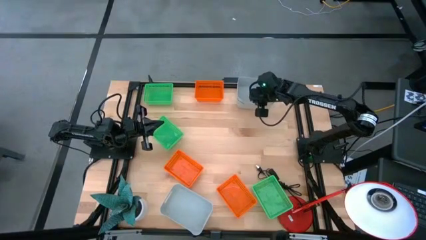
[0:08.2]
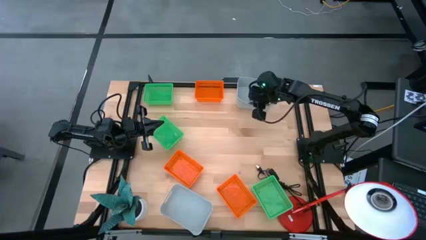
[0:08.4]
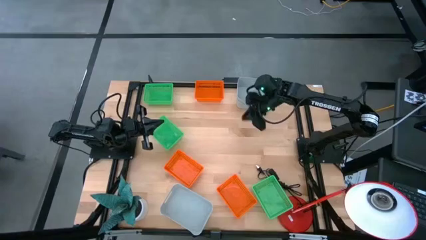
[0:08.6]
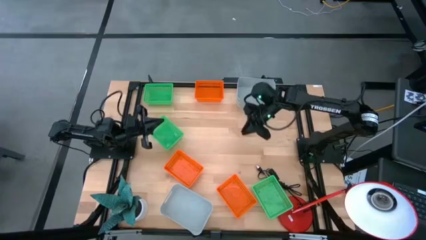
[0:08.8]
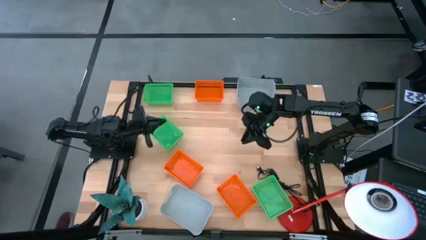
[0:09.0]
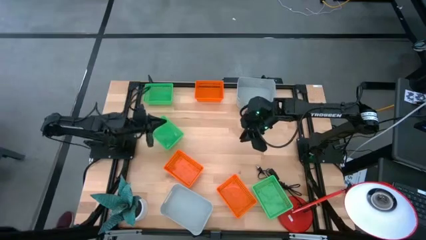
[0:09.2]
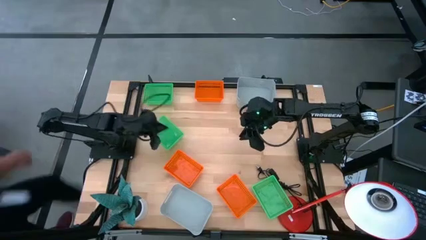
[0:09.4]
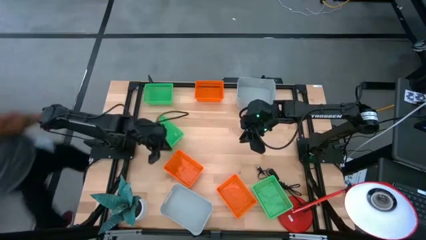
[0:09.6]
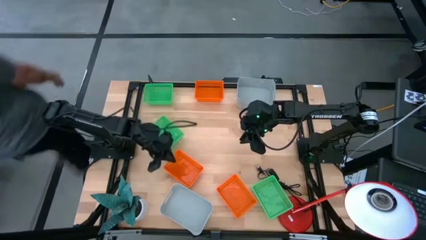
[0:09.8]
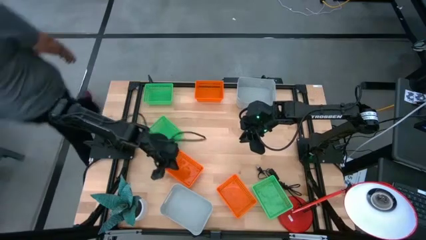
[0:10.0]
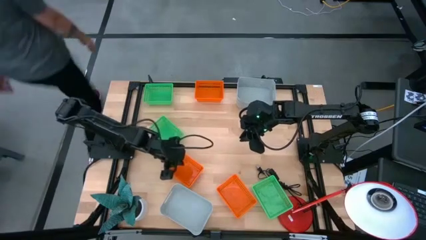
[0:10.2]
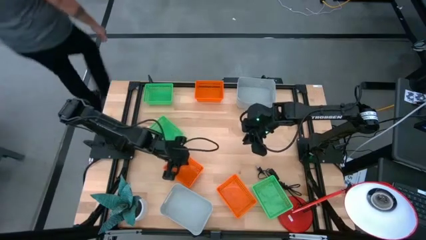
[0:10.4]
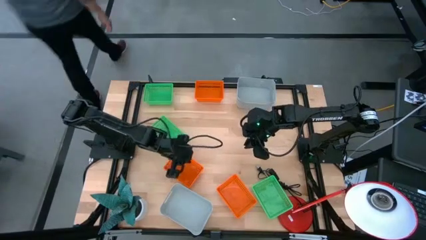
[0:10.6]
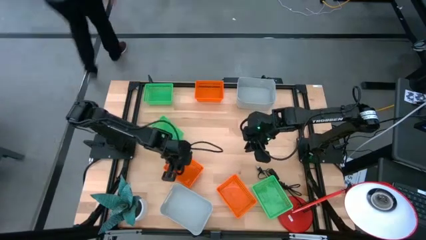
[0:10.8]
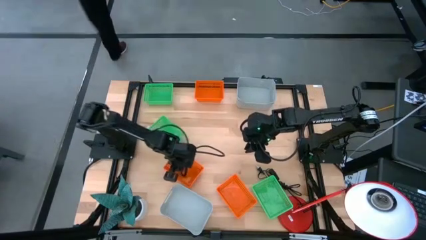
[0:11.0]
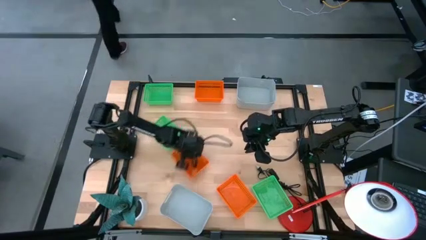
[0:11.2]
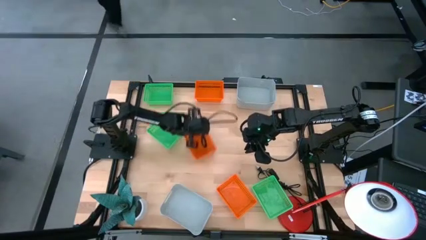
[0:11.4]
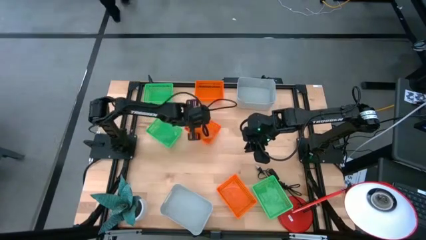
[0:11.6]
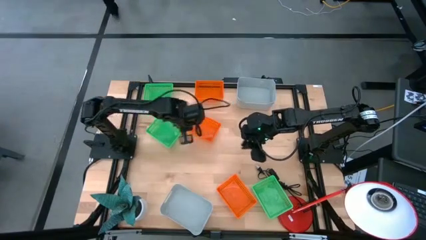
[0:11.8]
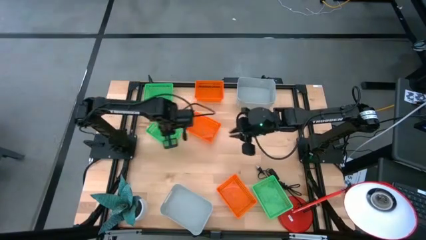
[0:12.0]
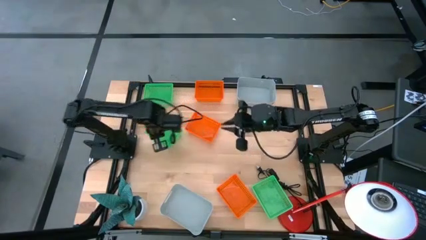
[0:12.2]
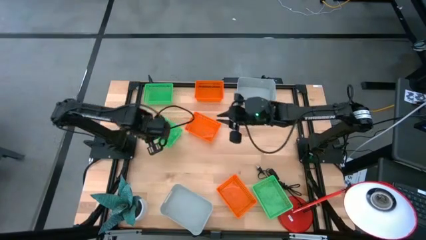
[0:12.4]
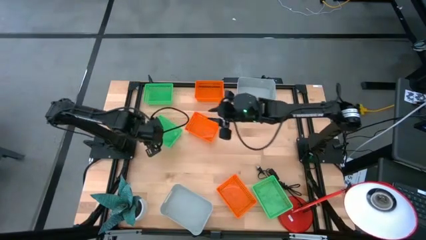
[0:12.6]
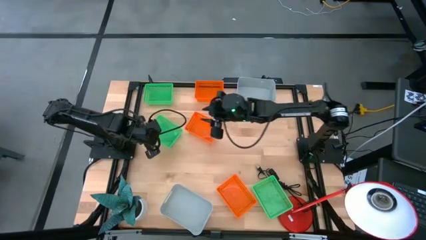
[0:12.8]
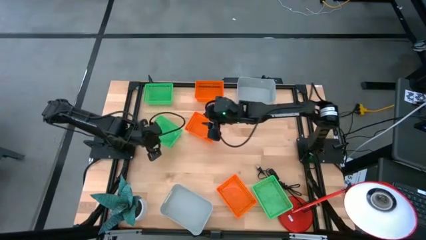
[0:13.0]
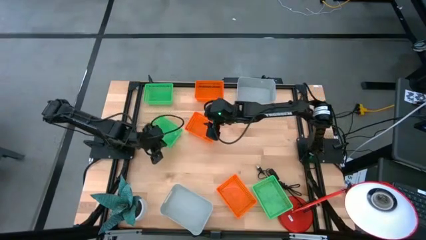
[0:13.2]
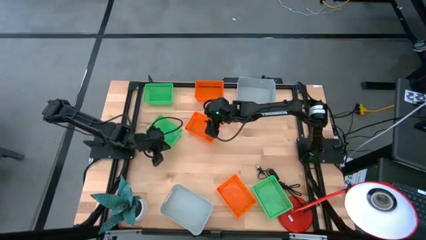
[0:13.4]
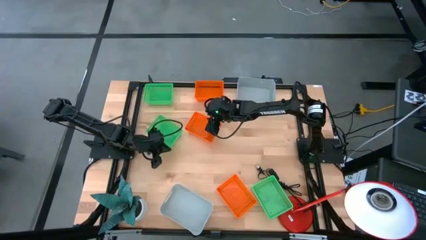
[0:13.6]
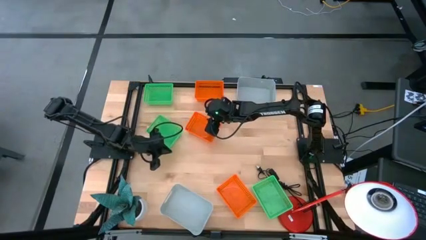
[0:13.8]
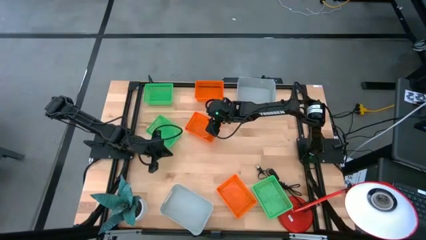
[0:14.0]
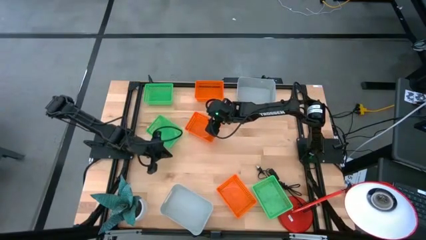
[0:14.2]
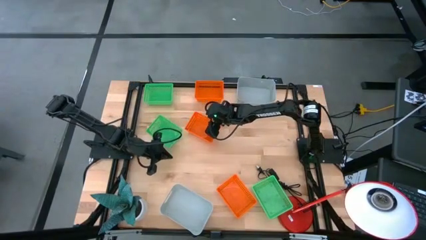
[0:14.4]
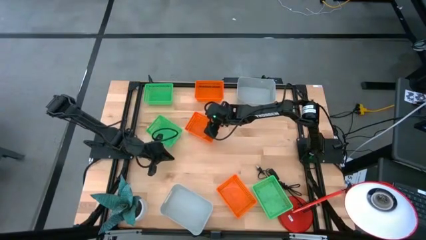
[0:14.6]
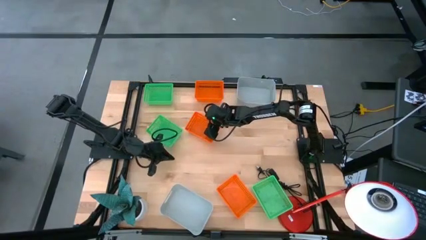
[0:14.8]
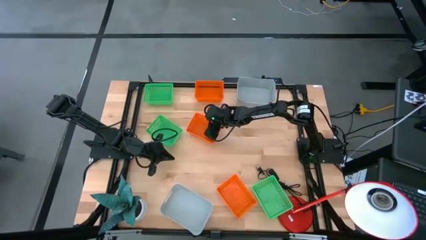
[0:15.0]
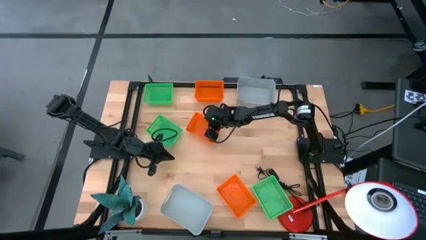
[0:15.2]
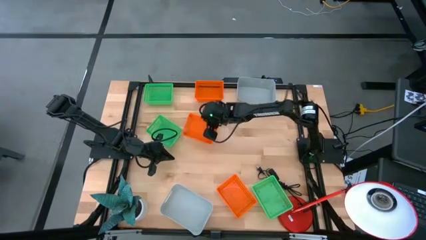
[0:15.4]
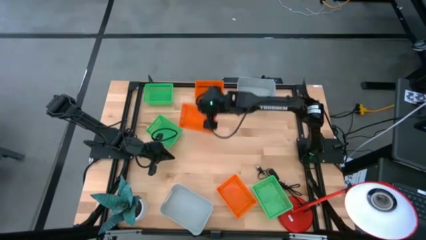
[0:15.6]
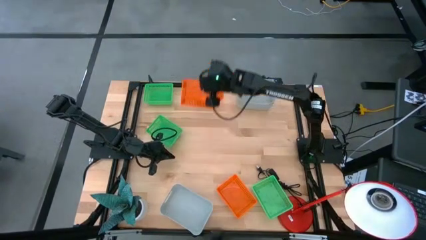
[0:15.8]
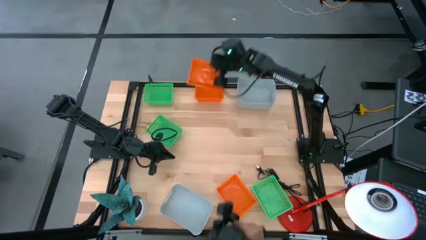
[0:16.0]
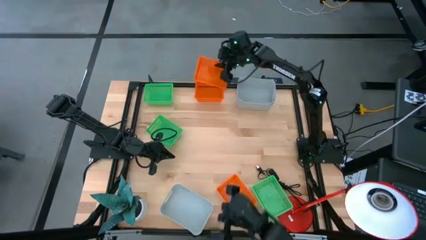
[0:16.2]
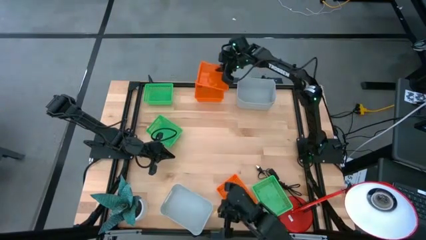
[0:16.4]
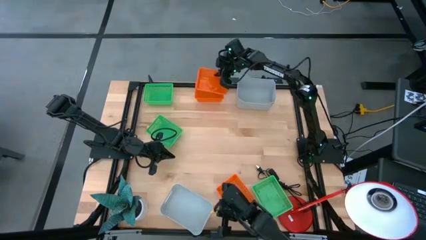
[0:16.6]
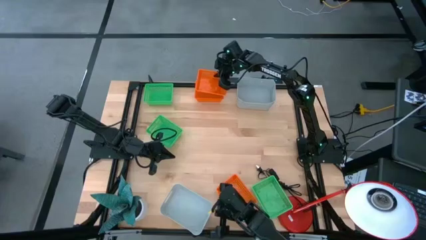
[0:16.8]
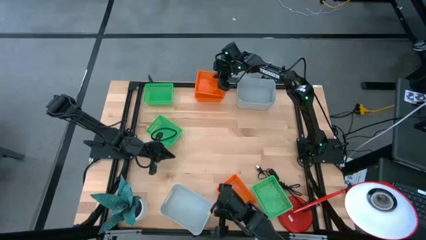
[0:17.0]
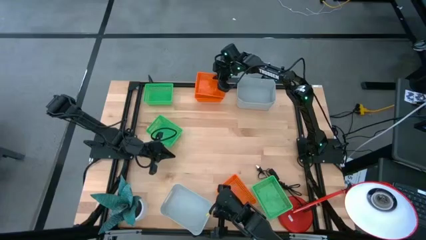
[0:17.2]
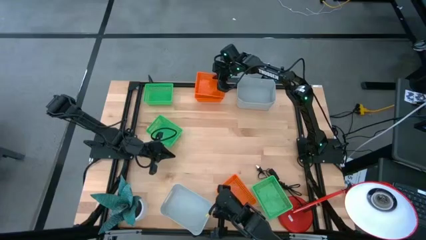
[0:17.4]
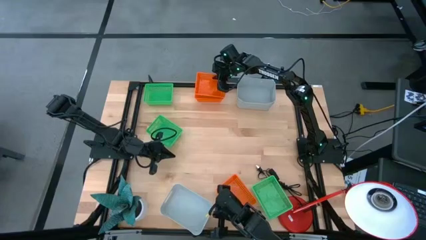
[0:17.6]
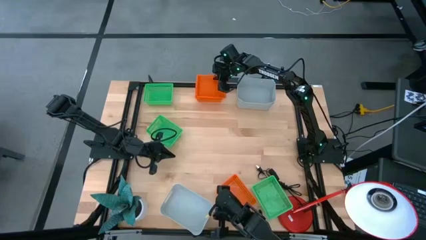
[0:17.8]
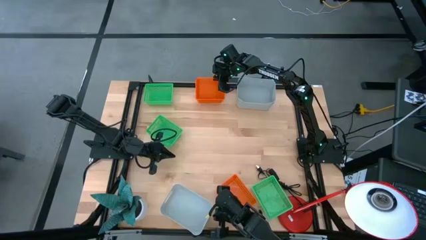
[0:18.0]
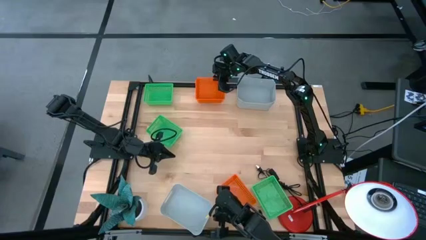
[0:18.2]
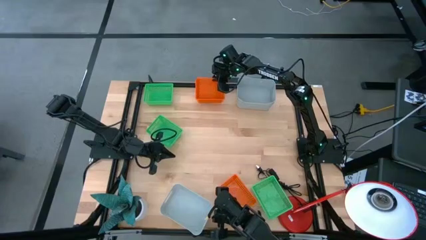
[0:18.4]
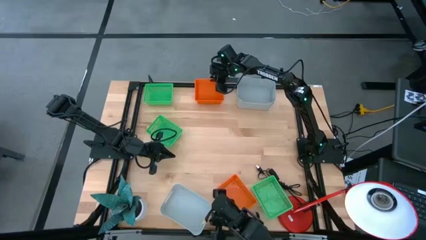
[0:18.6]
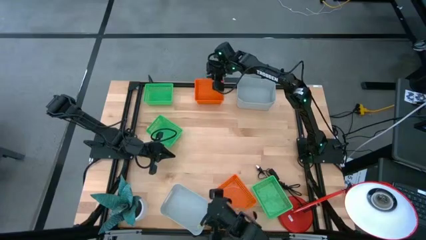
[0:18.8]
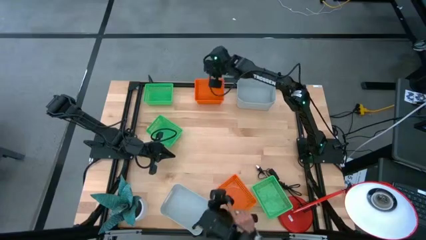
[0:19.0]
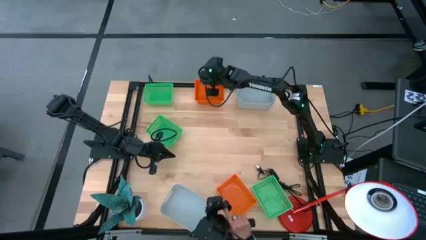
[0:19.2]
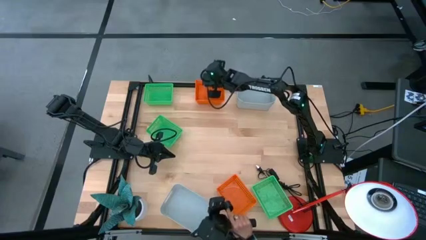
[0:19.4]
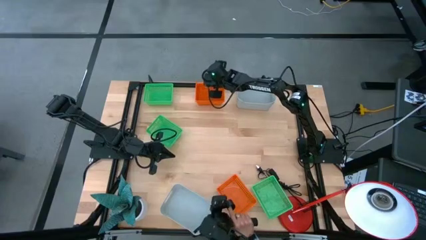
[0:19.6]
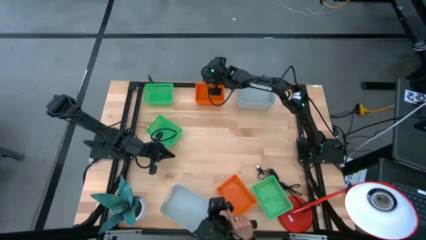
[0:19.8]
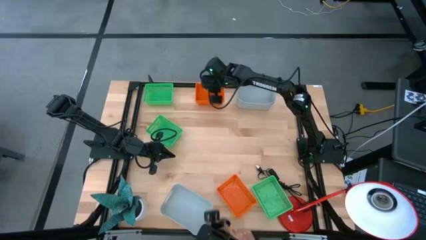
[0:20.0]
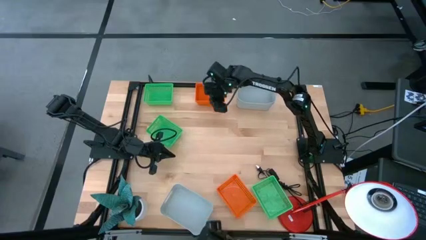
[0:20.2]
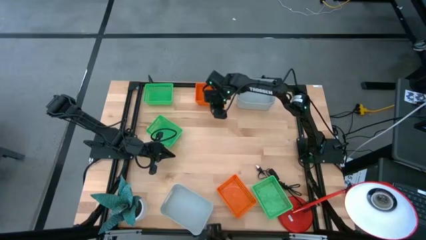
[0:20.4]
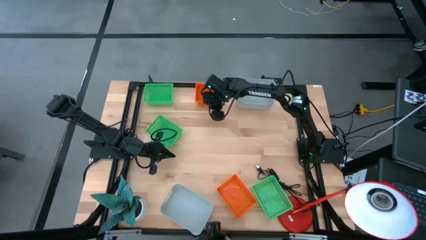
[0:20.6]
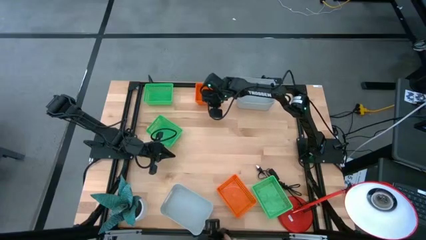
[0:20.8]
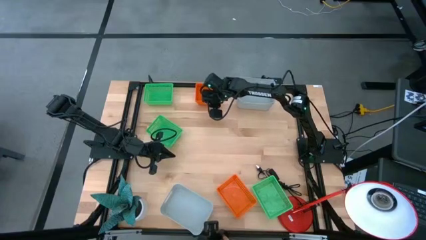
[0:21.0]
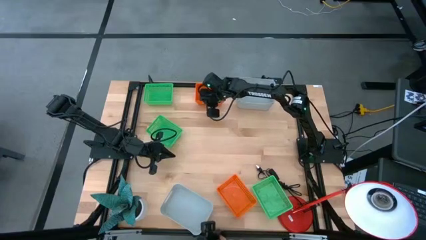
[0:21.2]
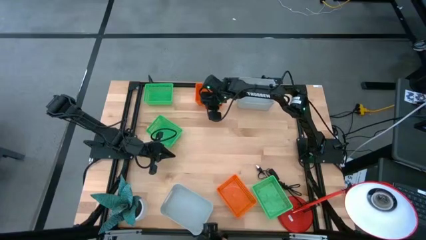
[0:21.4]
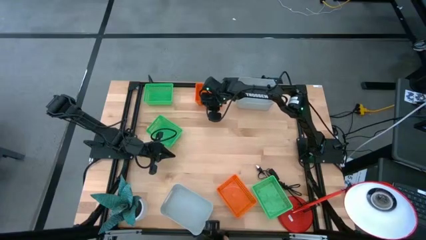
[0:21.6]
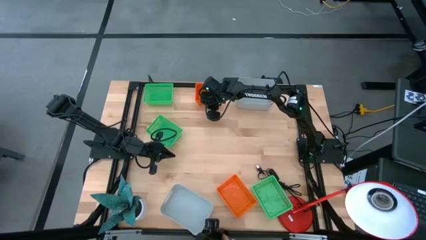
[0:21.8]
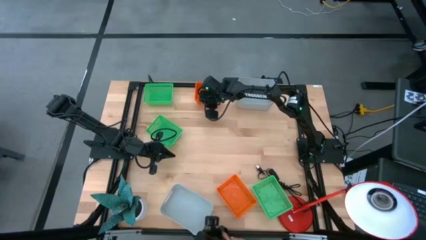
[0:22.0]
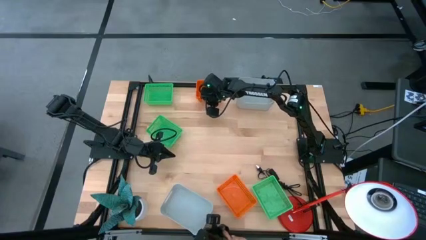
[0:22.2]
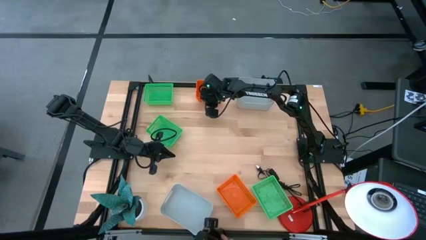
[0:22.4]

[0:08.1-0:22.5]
Stack the middle orange bin on top of the top orange bin
